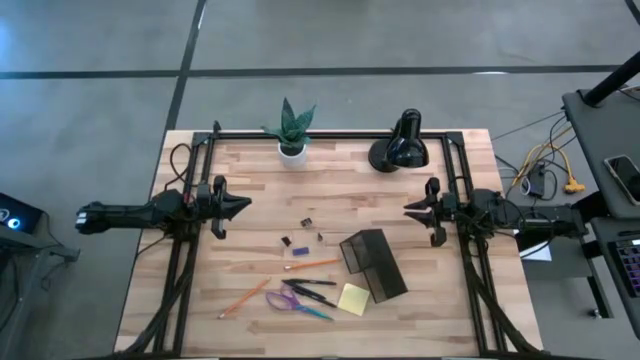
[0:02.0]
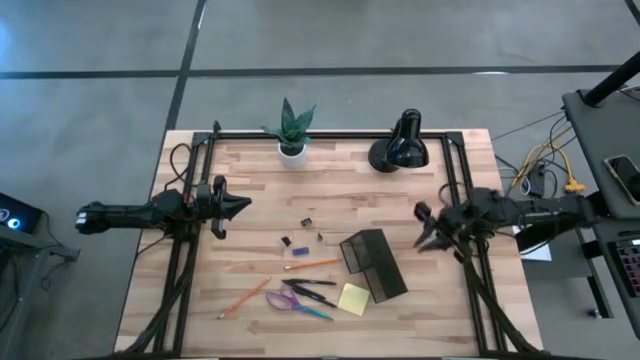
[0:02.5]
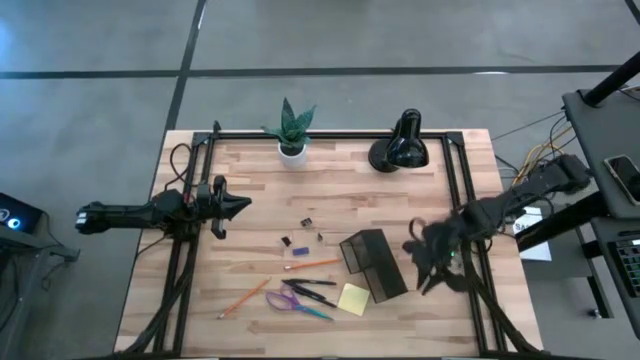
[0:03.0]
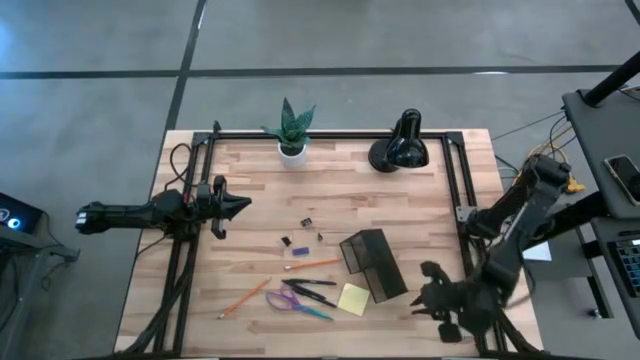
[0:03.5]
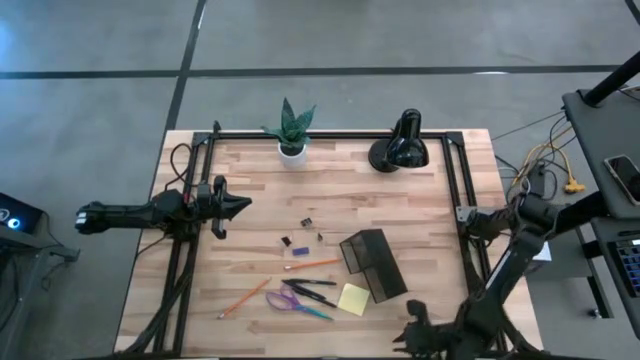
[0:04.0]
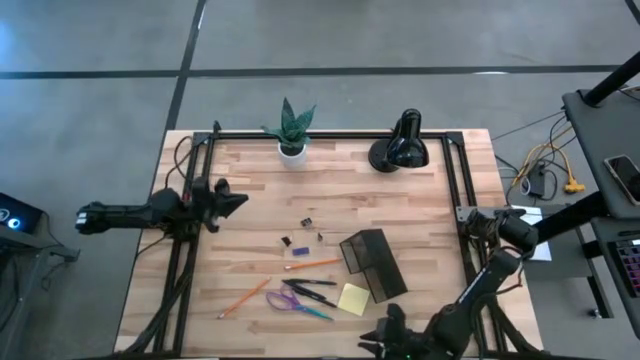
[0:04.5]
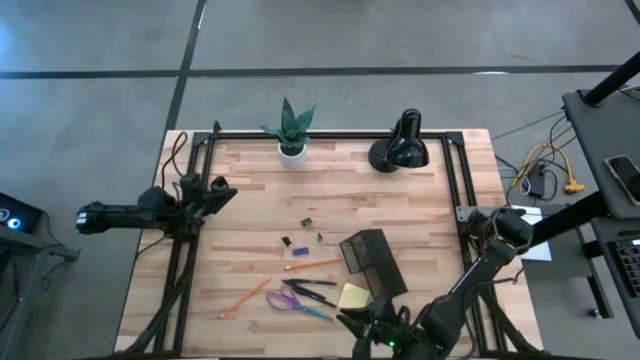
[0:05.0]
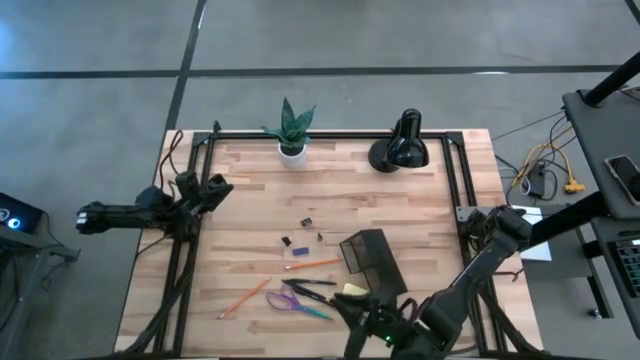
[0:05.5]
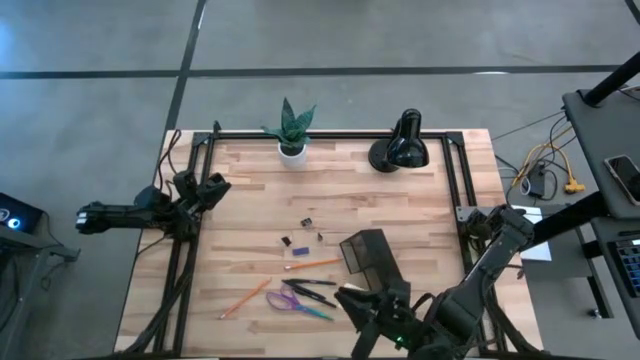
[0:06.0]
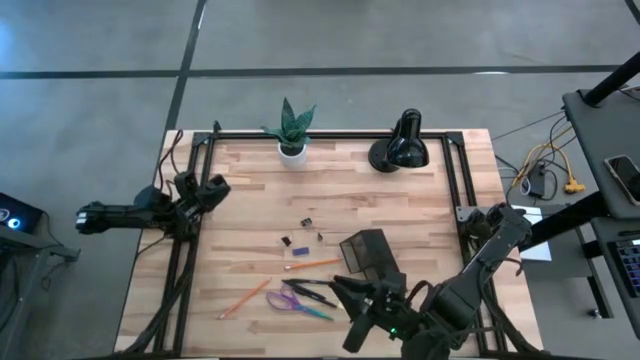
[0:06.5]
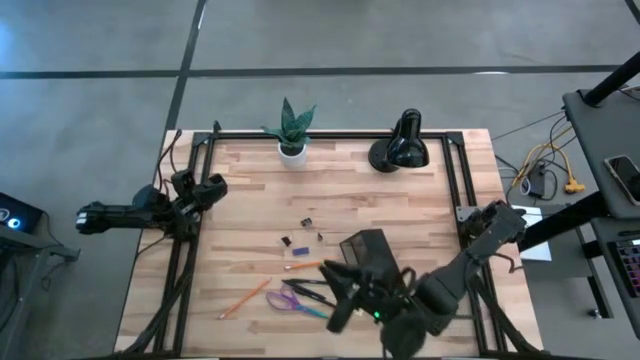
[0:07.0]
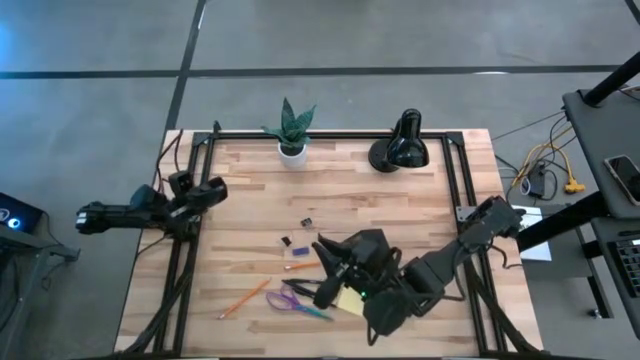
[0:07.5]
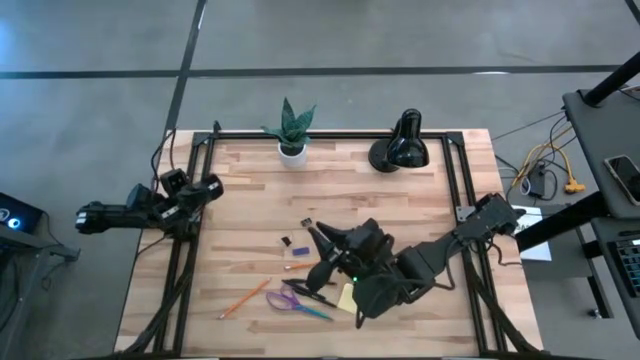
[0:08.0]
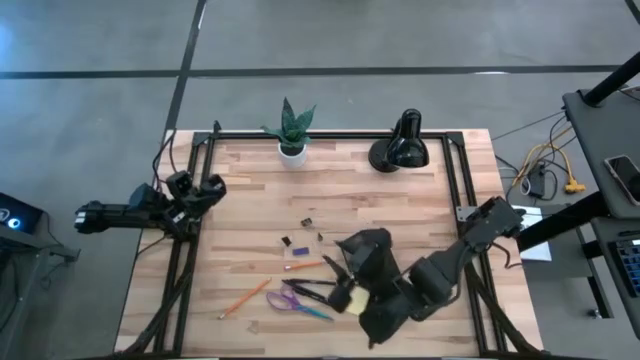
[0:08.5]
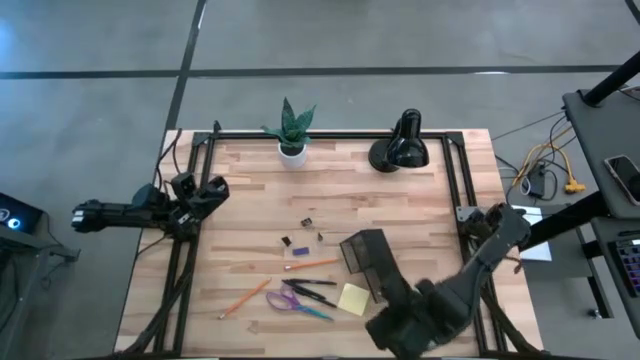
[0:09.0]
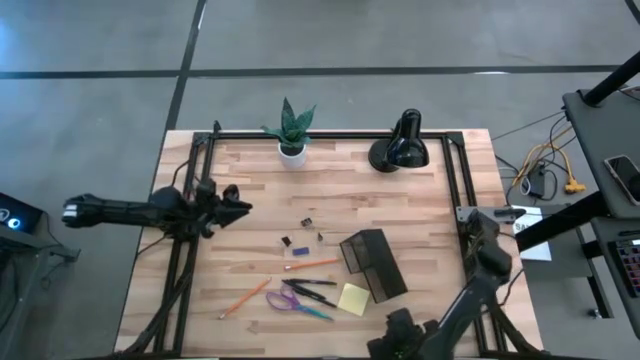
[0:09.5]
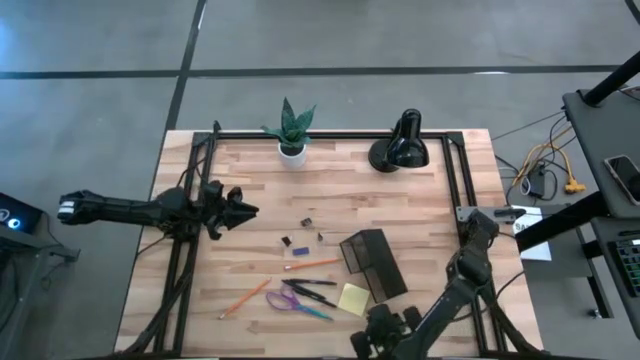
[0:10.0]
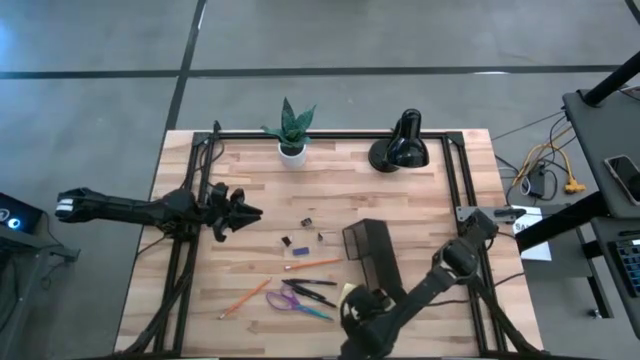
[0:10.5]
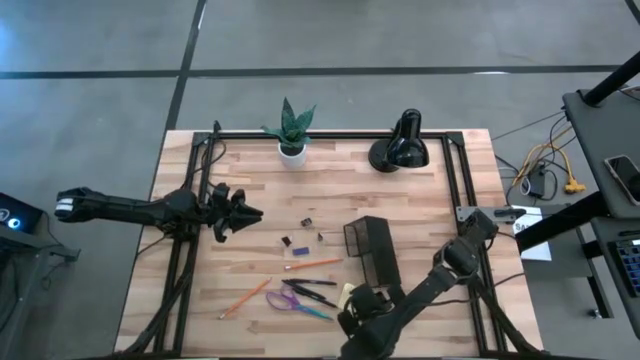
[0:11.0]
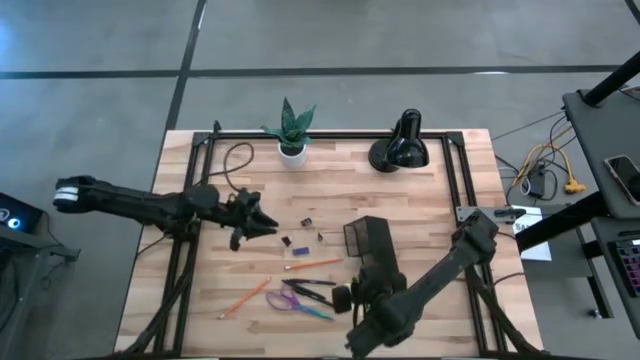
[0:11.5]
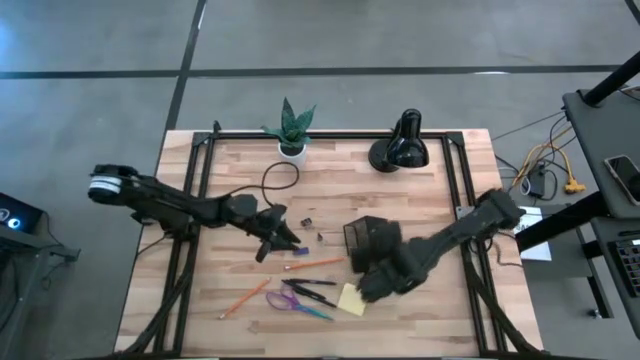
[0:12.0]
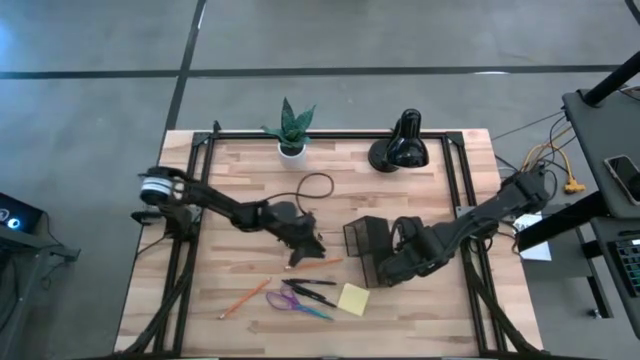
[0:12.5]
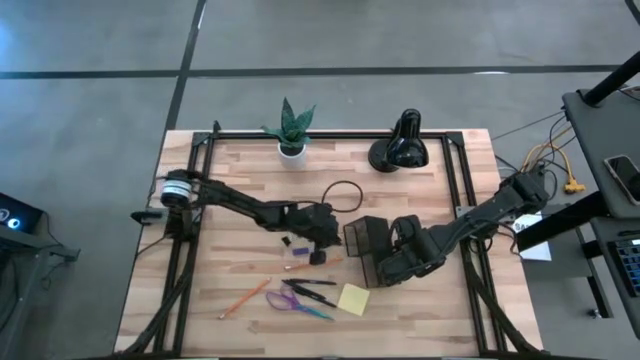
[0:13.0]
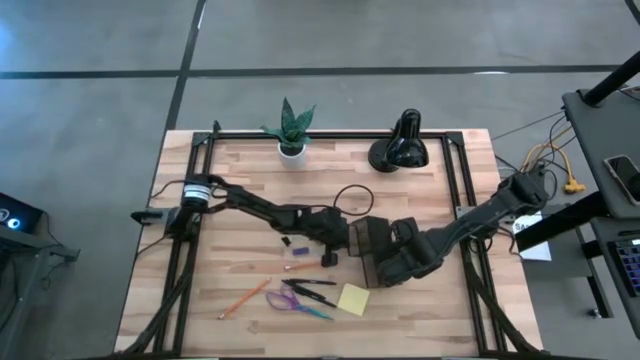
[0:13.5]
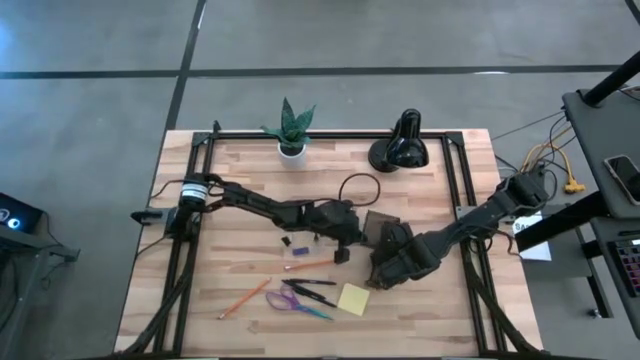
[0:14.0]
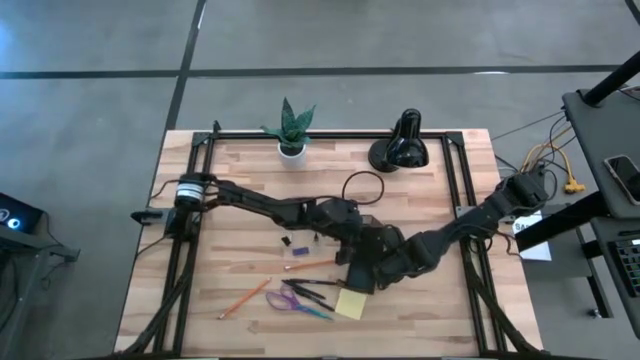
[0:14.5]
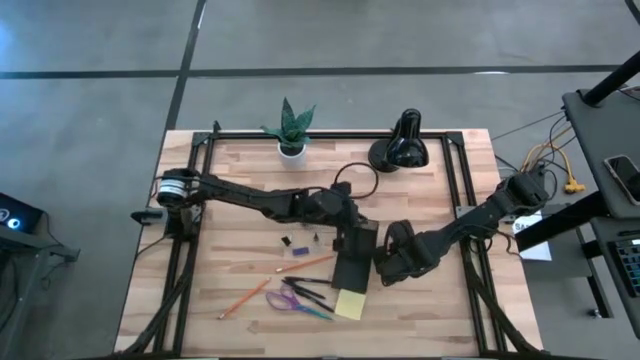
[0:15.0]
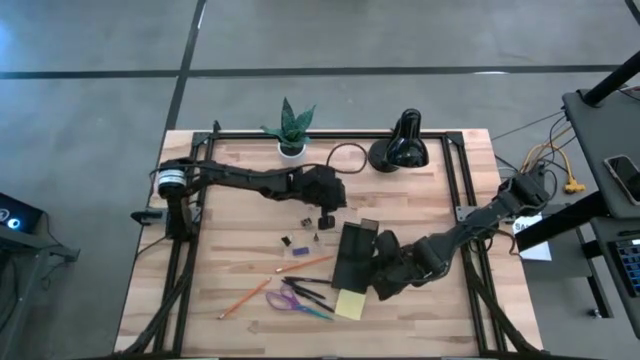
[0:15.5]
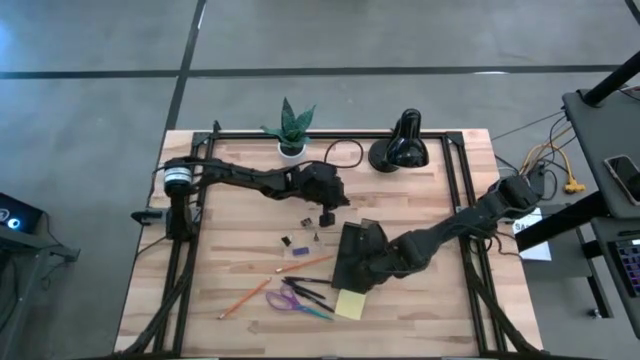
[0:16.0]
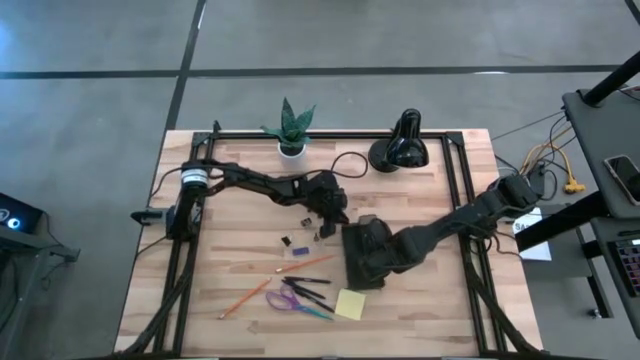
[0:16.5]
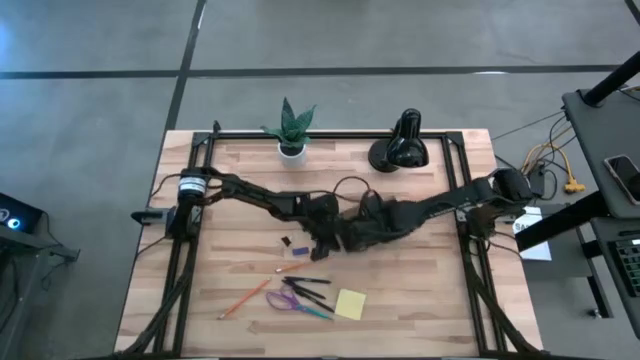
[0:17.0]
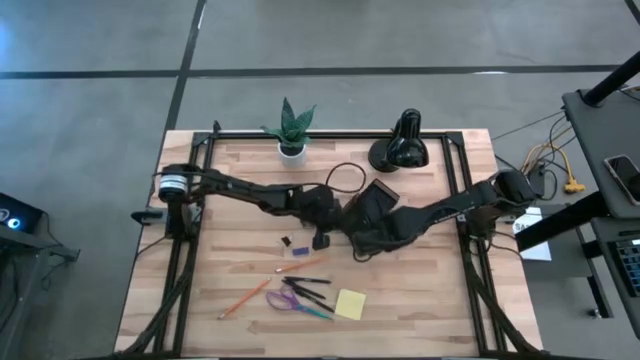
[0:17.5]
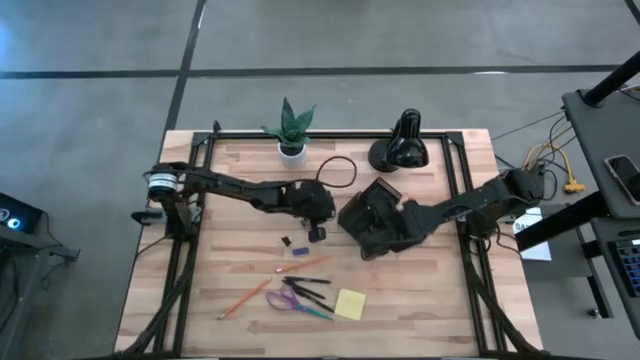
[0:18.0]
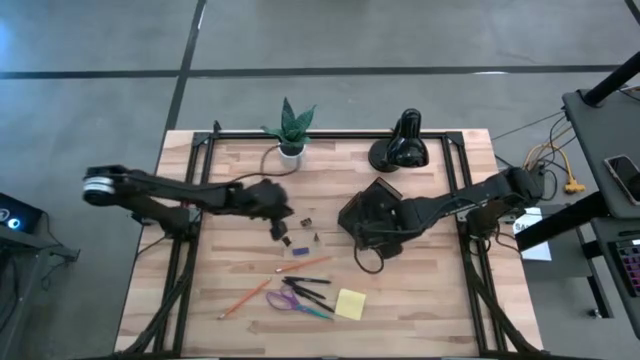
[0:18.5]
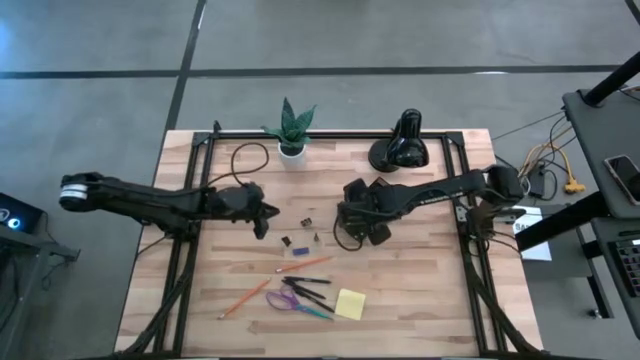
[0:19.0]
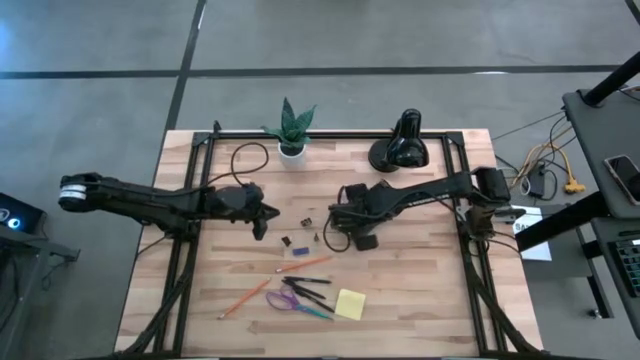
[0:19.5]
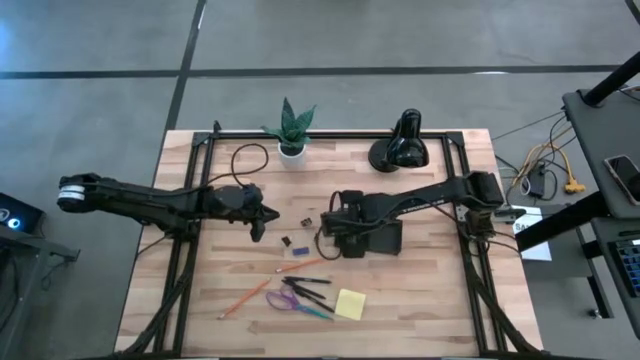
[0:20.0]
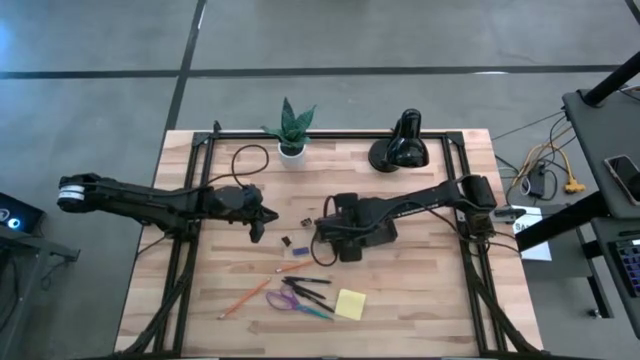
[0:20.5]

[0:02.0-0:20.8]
Task: Pick and place office supplies into organizer
Prepare the black desk organizer on the table

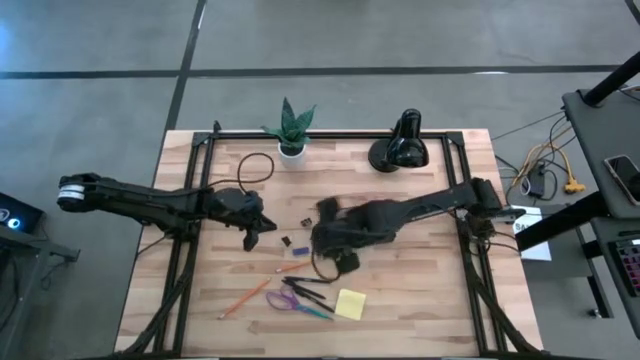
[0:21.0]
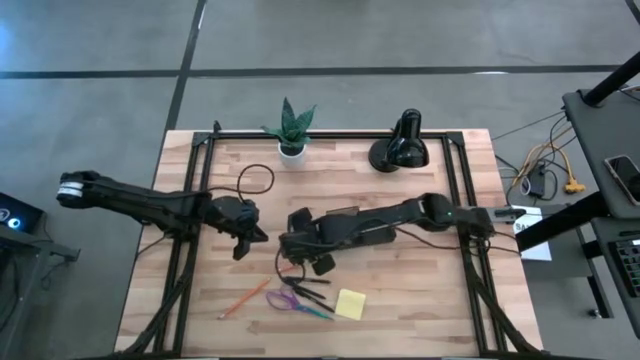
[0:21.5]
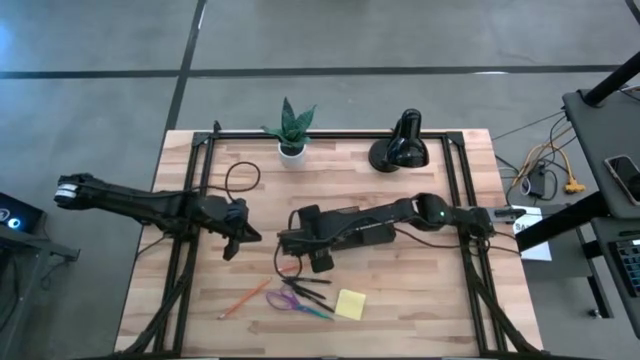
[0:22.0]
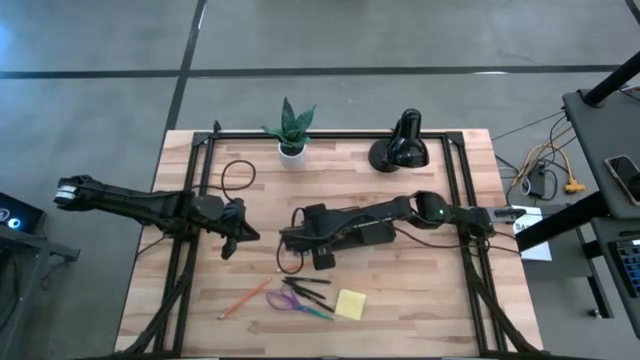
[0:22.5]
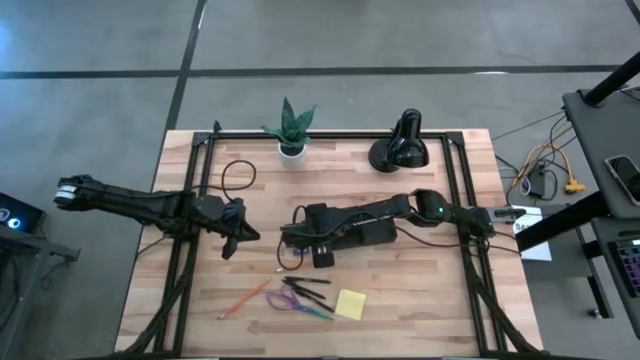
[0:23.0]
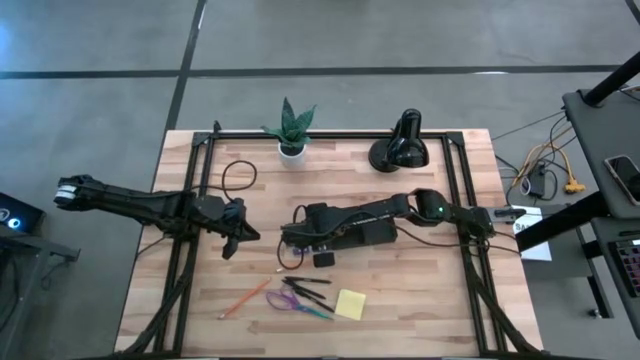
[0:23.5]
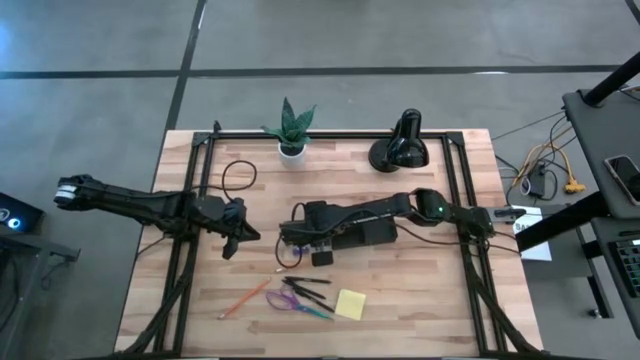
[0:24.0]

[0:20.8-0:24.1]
Put the bottom left black binder clip into the black desk organizer
